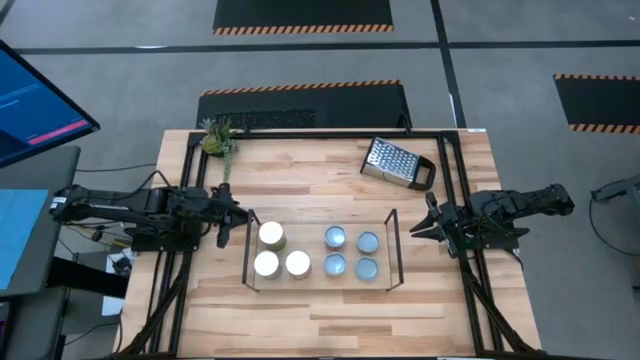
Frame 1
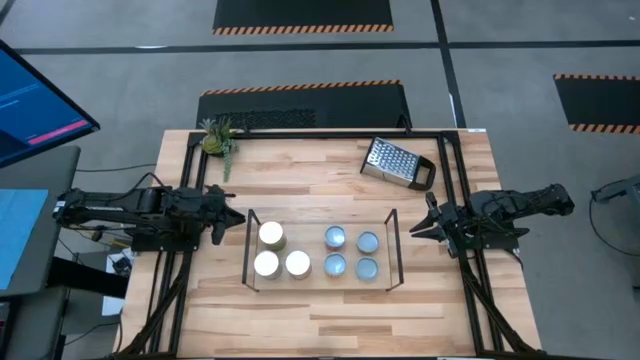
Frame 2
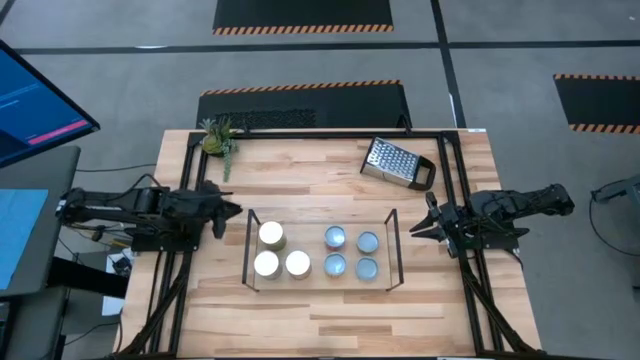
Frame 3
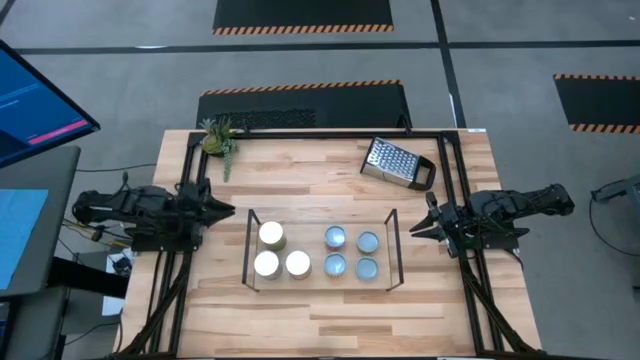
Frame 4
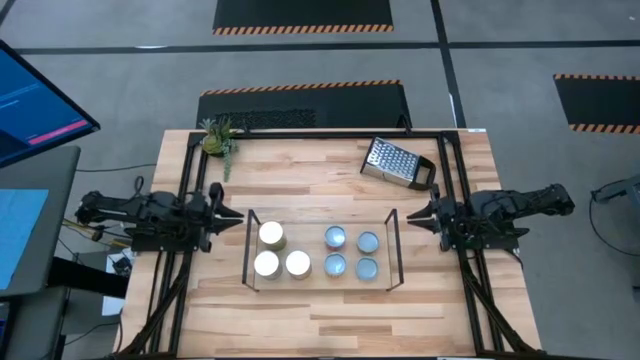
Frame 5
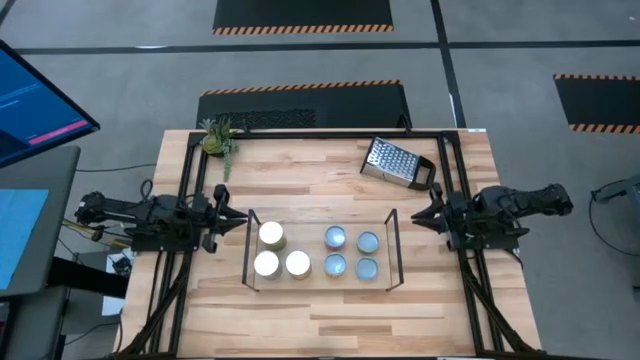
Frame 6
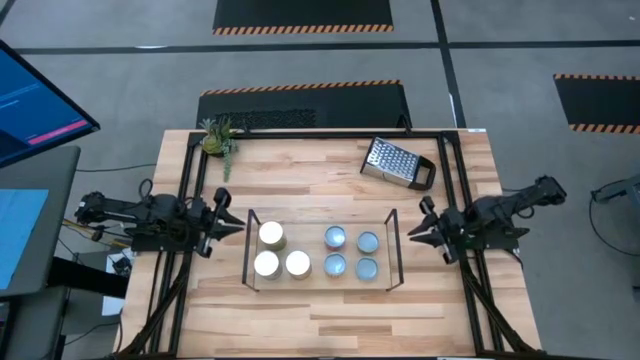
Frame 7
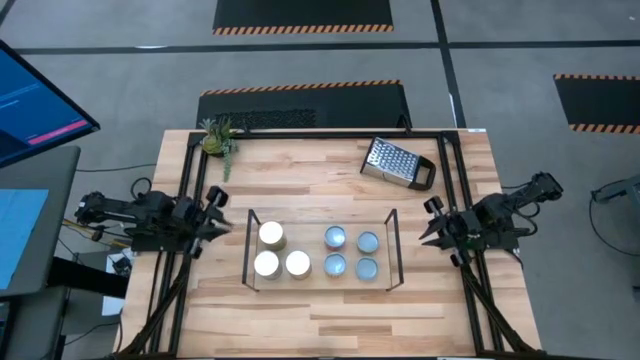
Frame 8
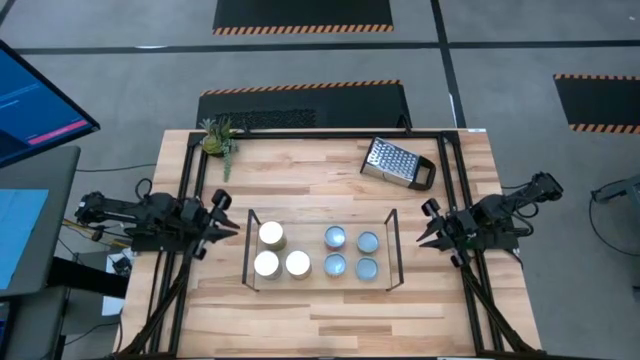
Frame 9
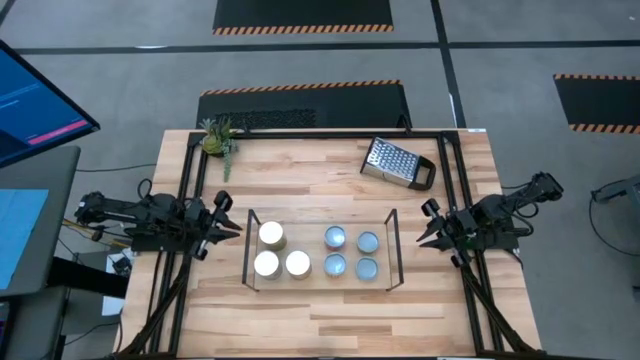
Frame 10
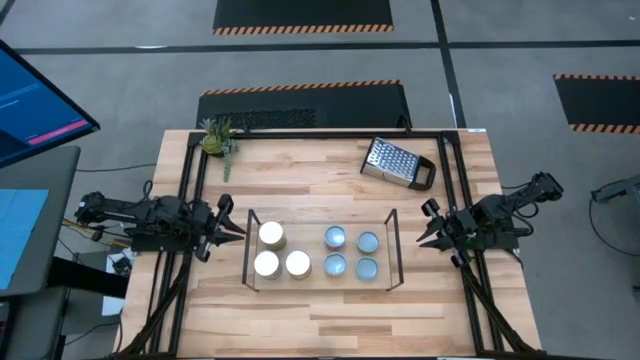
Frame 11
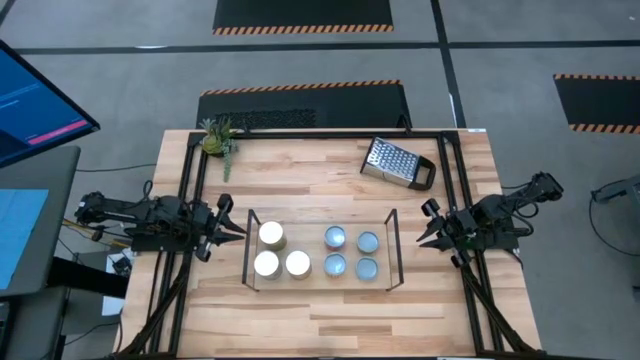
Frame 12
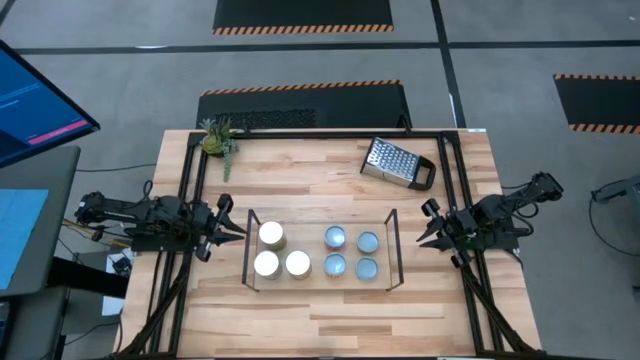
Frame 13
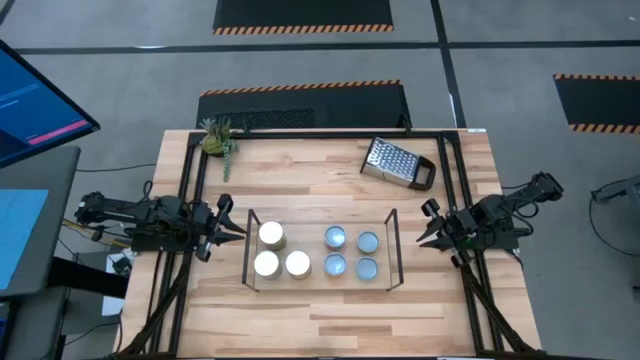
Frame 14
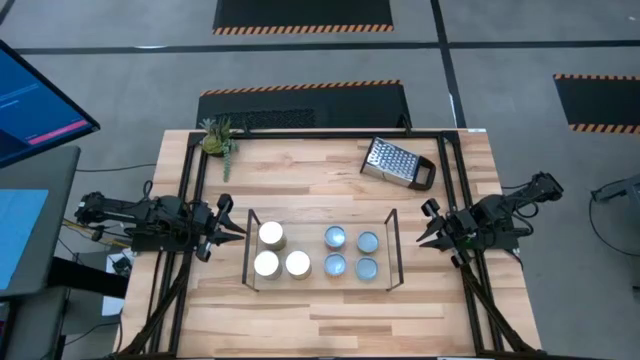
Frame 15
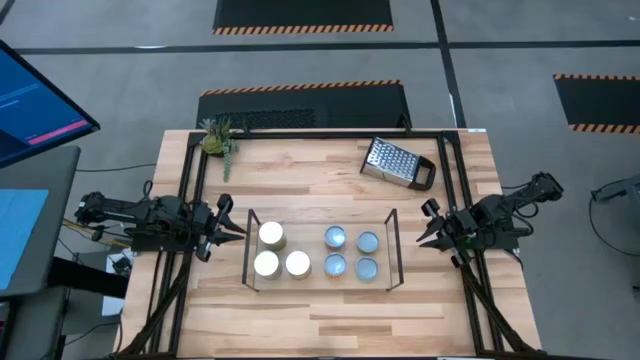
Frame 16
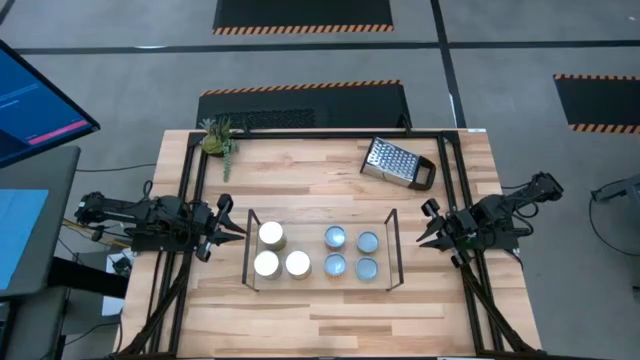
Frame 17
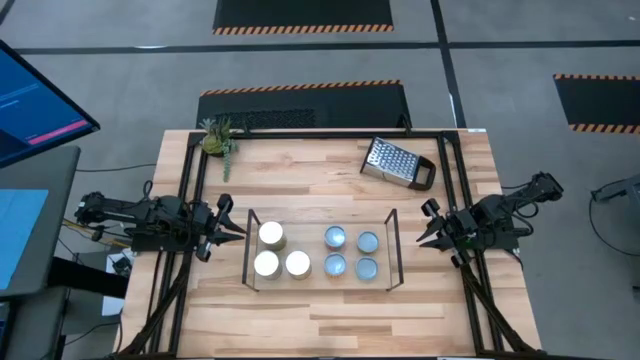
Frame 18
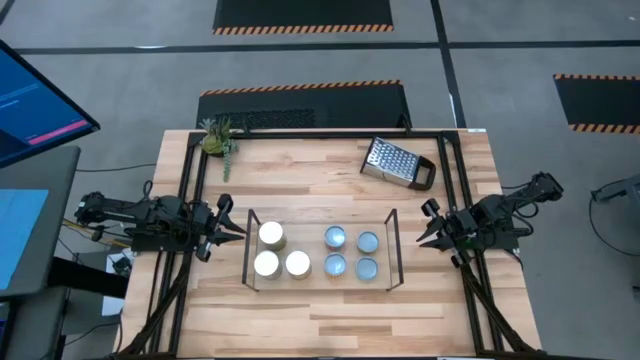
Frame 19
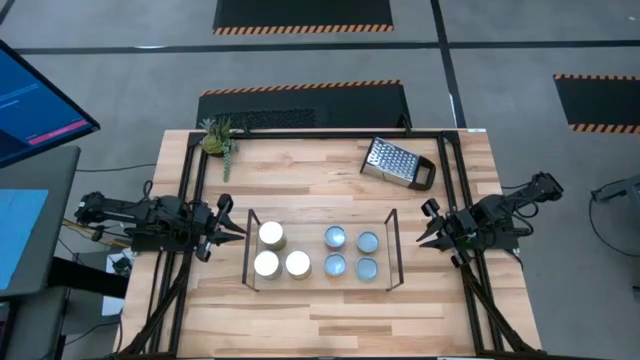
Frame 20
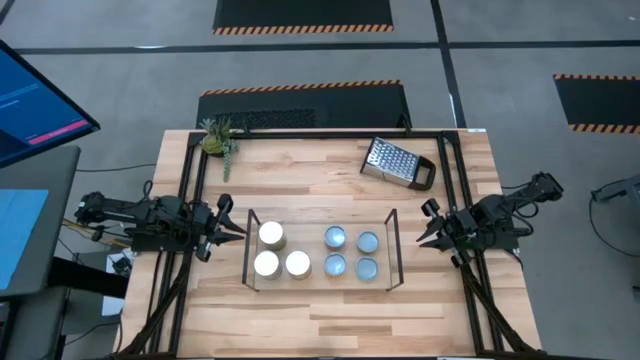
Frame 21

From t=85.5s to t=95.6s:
Task: Pick and place cans onto a shelf
Return to Home Position

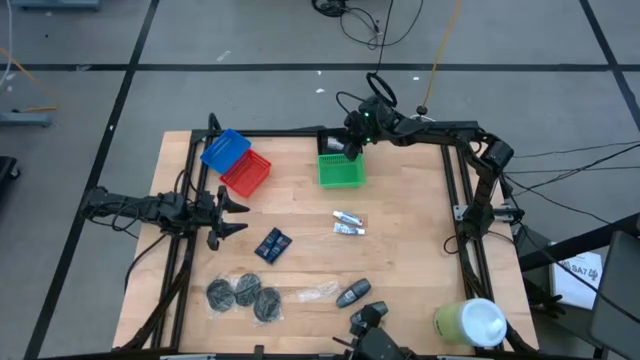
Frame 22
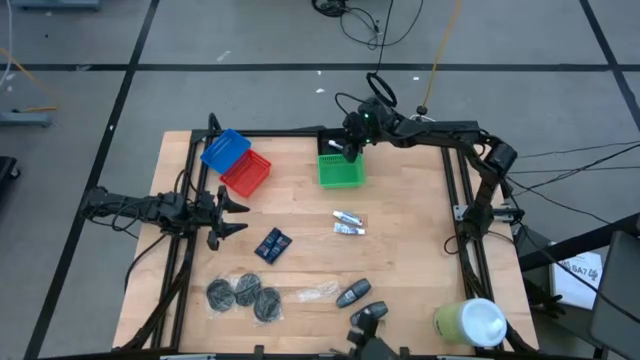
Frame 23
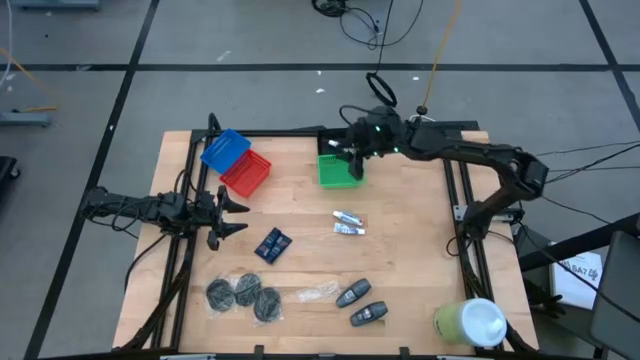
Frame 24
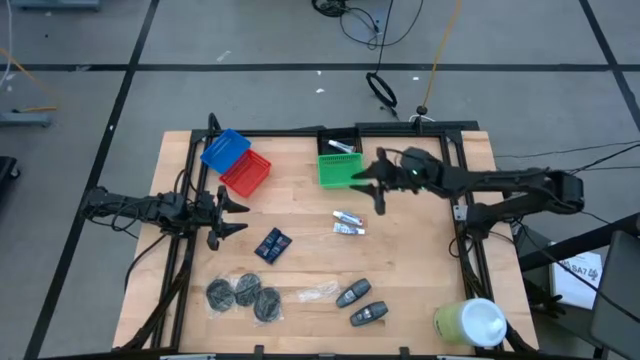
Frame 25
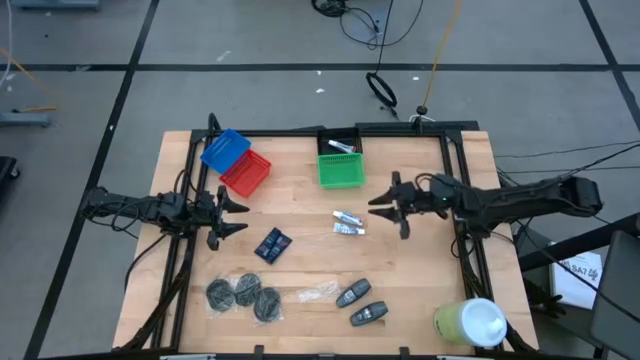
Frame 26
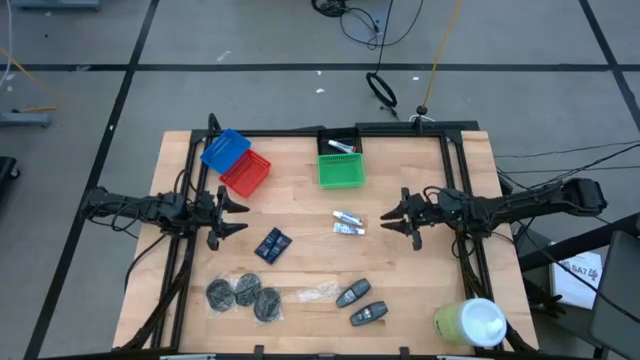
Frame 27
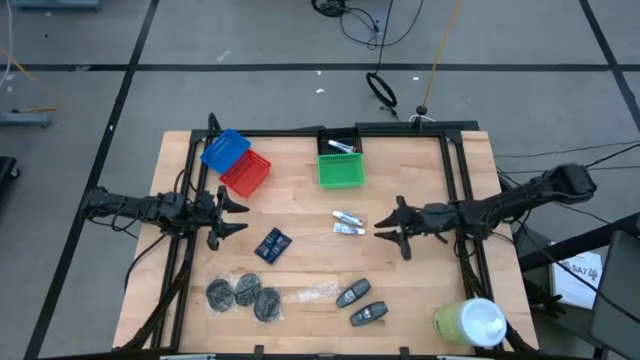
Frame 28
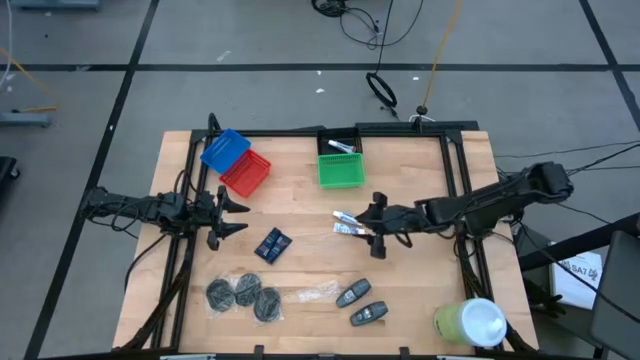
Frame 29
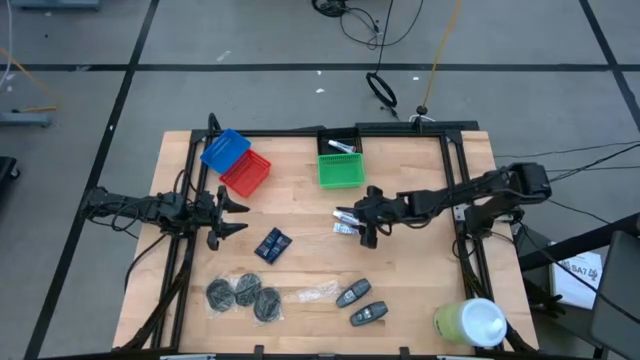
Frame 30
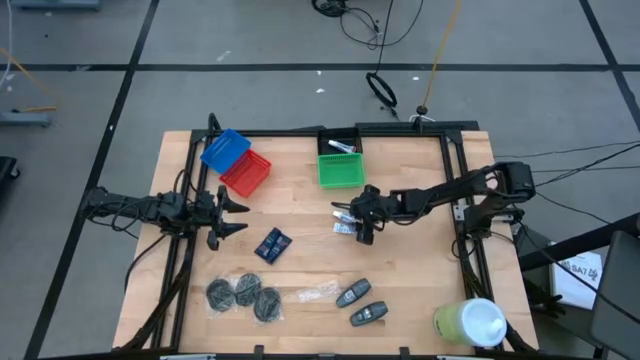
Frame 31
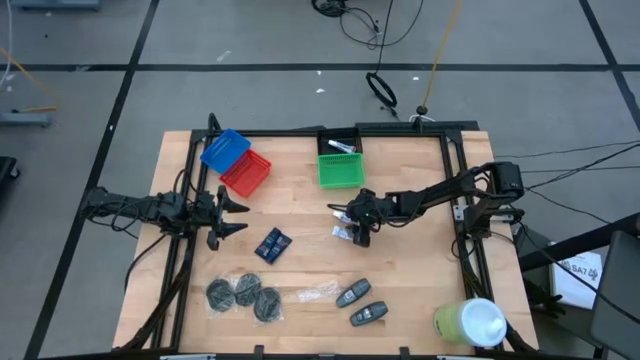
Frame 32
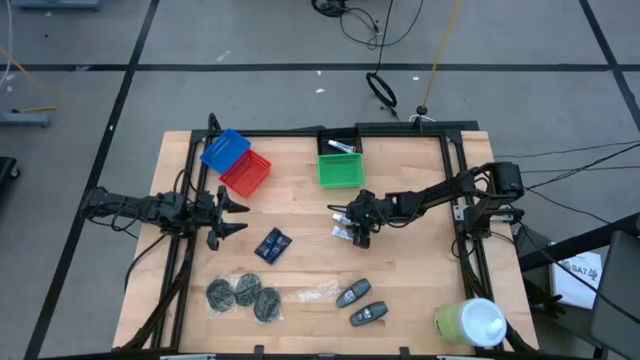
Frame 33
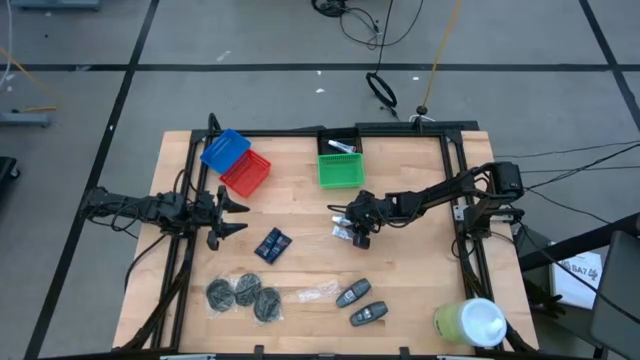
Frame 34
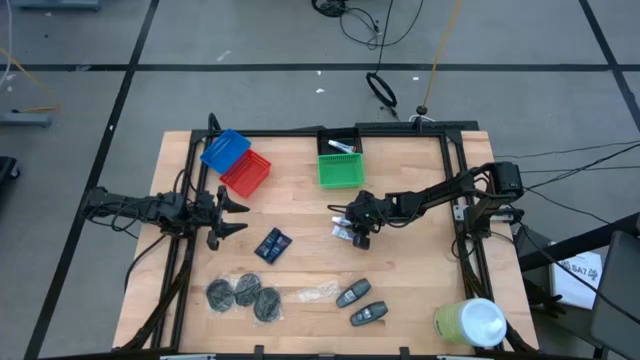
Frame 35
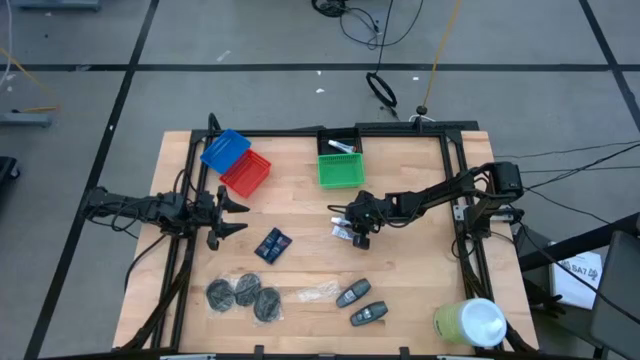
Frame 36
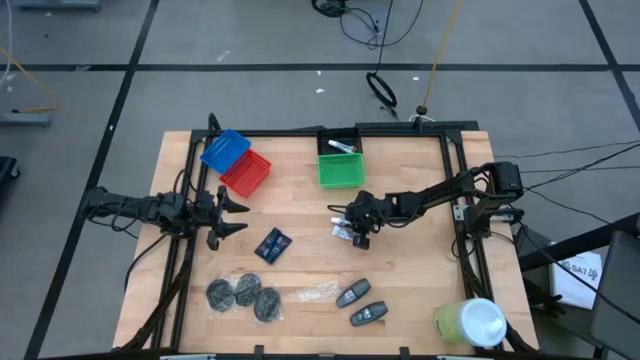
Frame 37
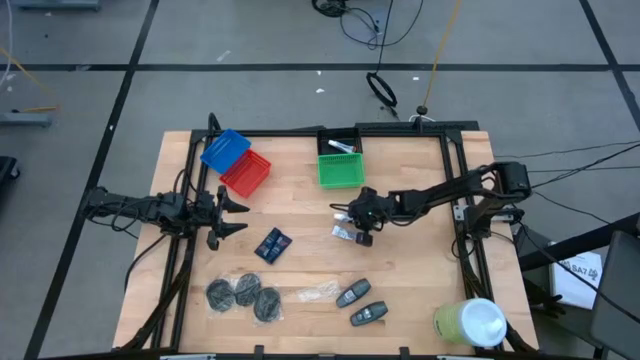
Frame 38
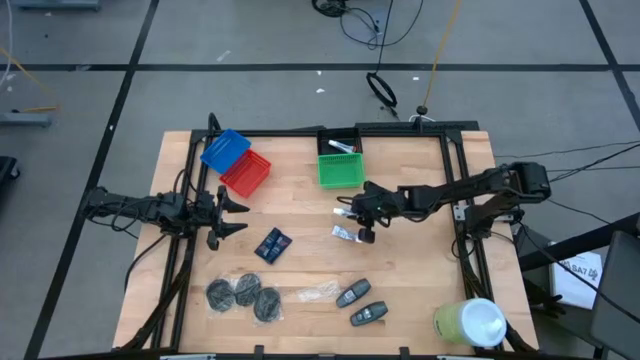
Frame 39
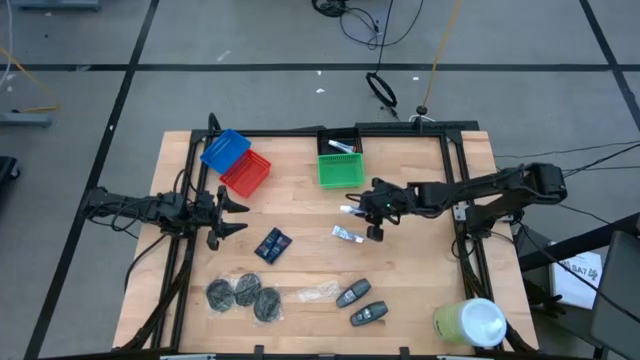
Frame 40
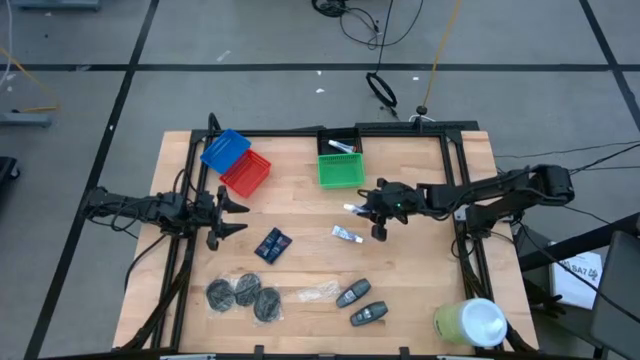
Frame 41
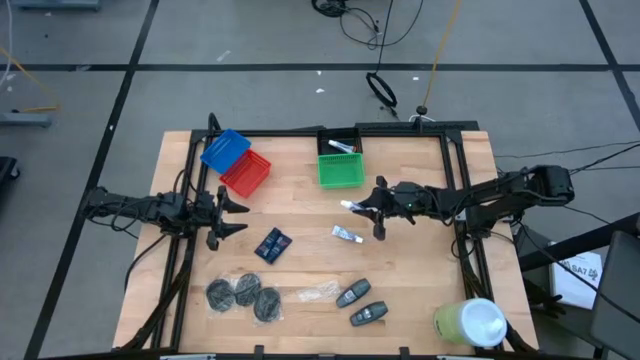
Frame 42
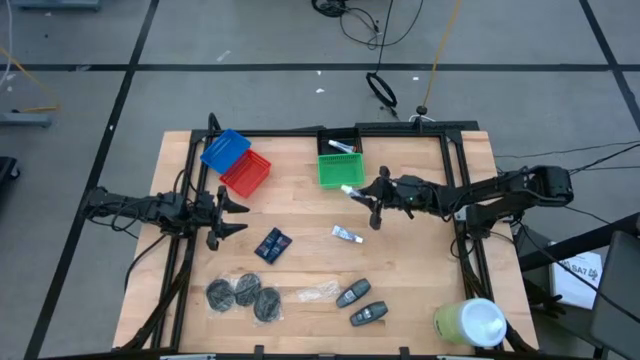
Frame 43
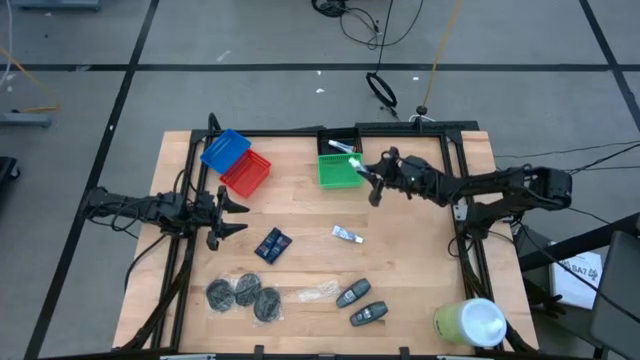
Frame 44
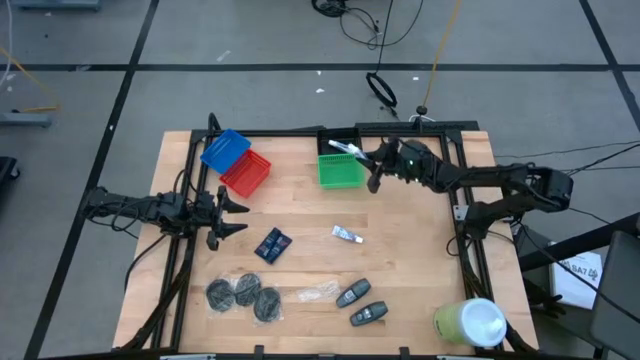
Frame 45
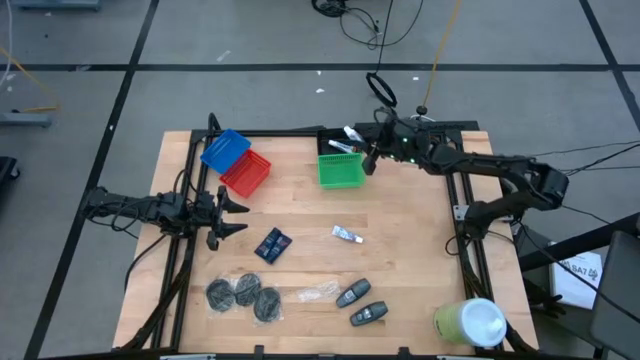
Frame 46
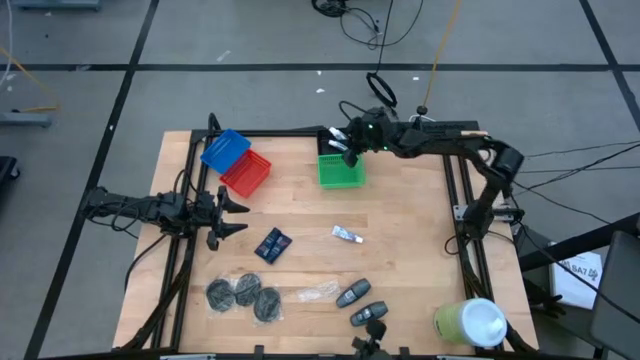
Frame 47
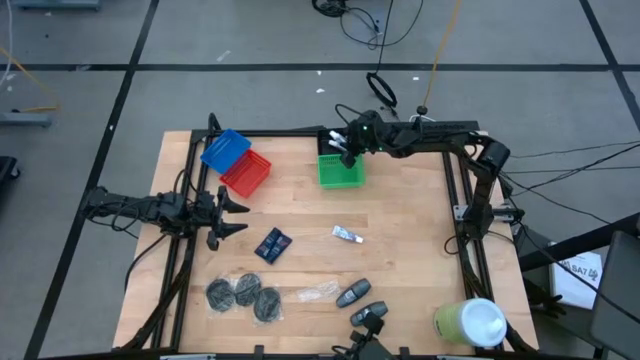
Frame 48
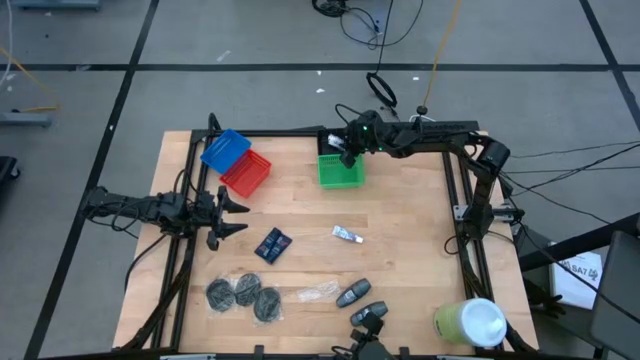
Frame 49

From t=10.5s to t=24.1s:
Task: Pick & Place Travel size toiletries
Put the top white toothpaste into the black bin
